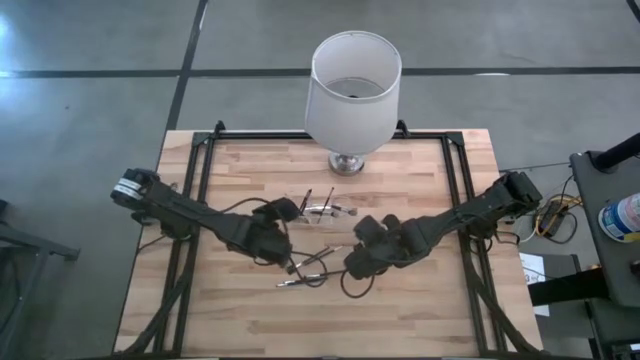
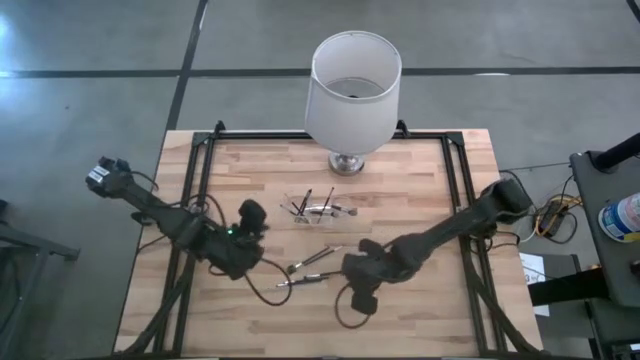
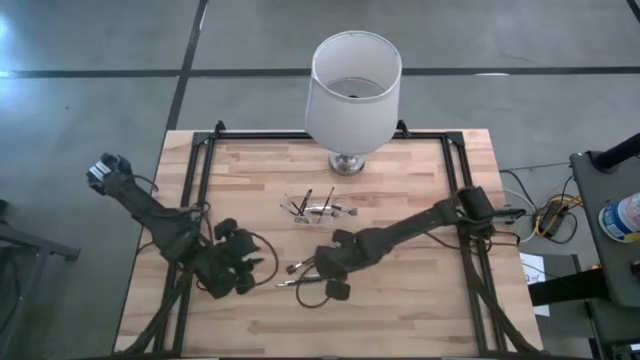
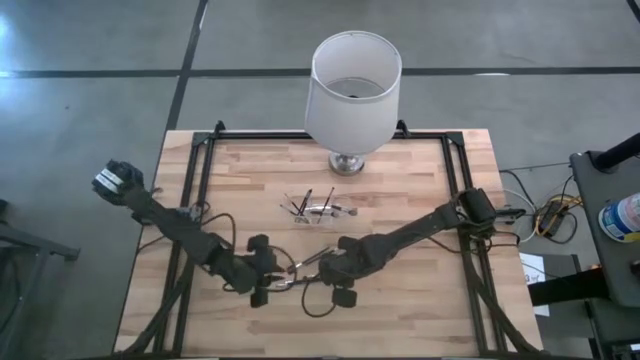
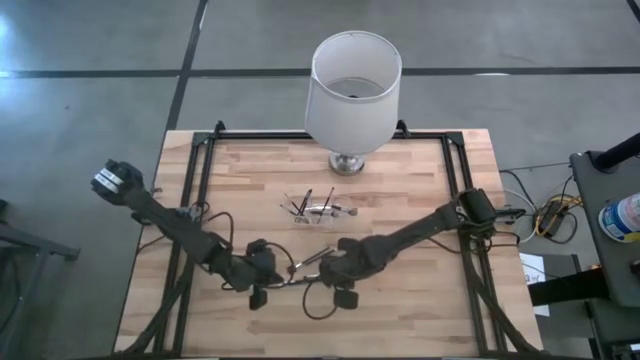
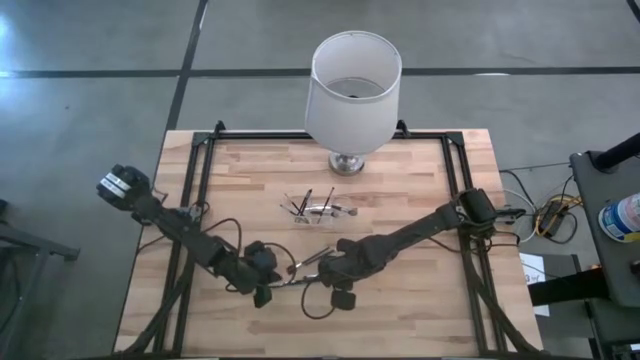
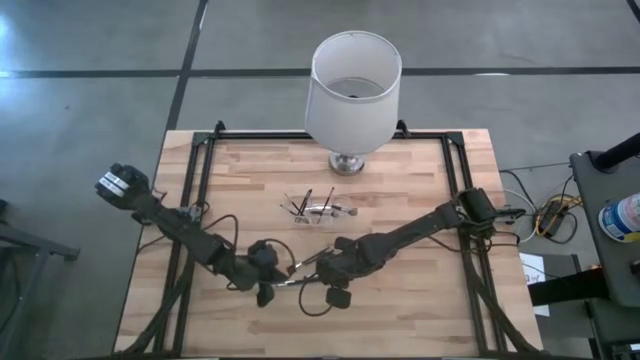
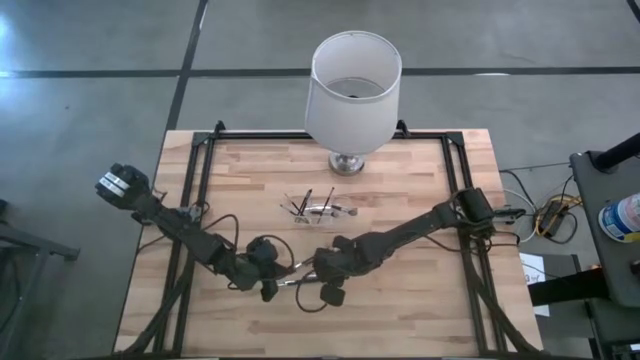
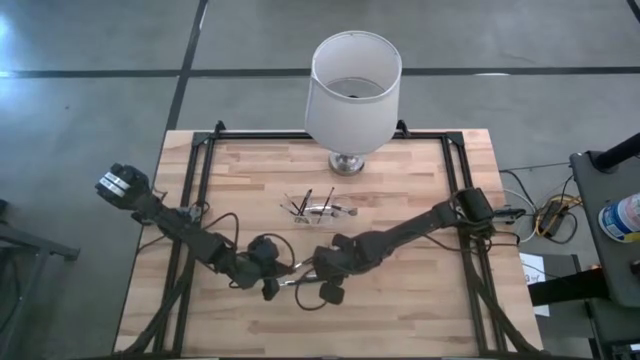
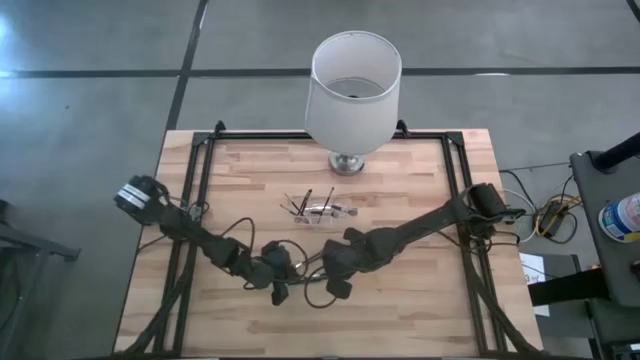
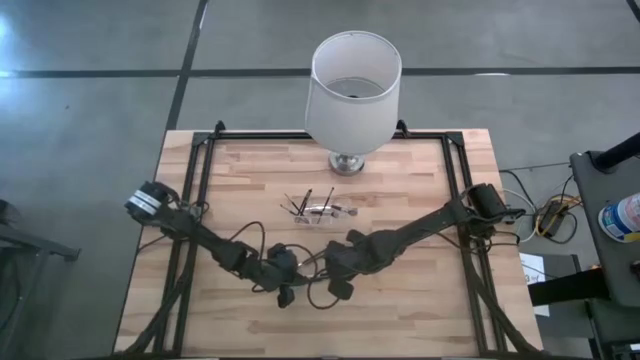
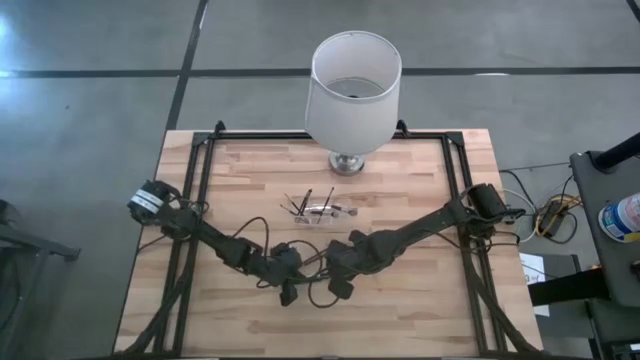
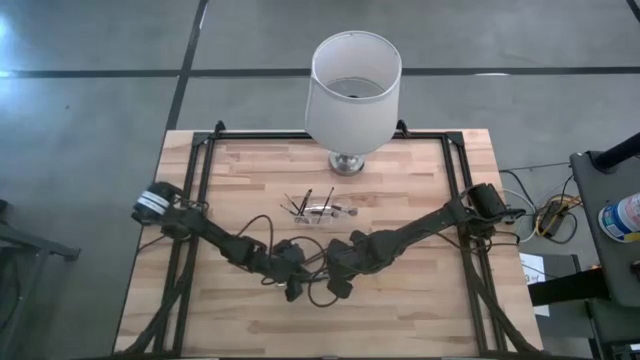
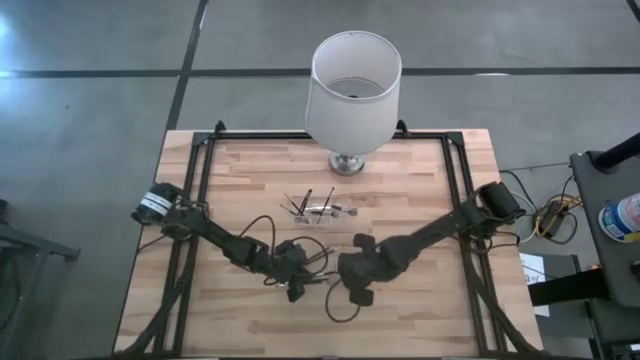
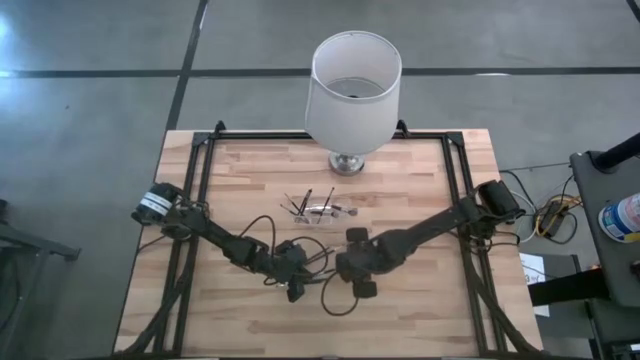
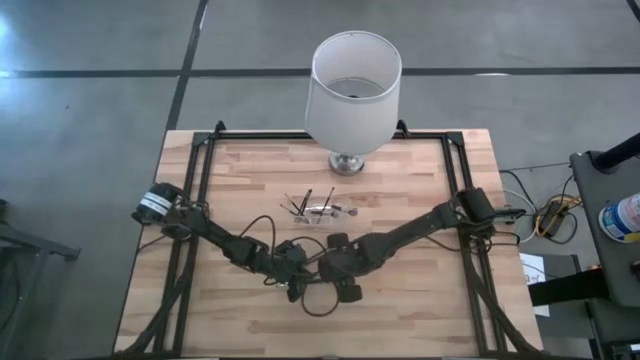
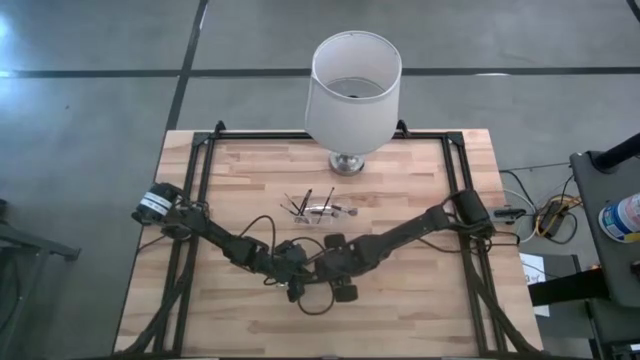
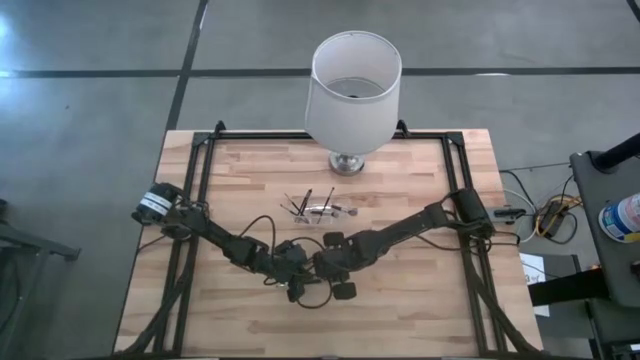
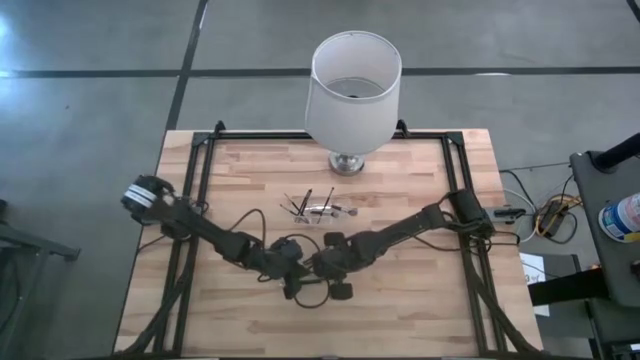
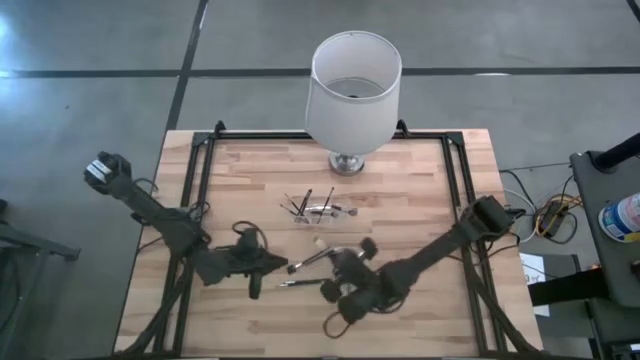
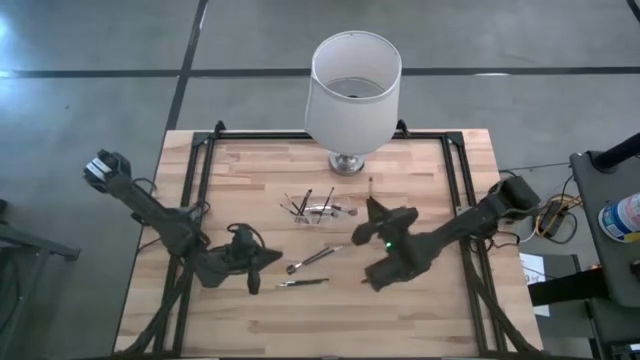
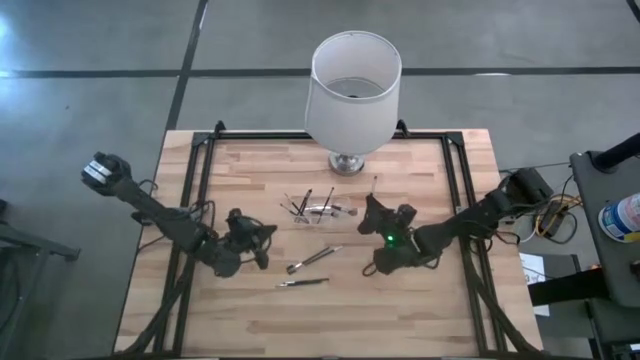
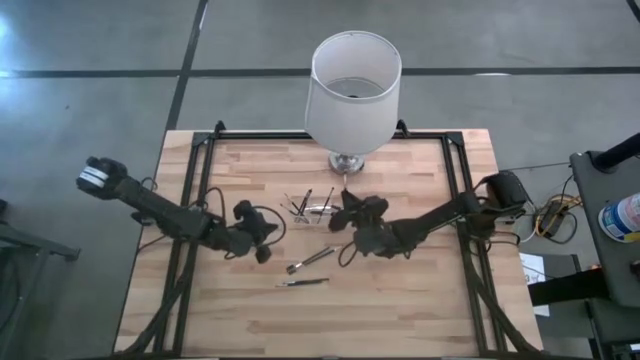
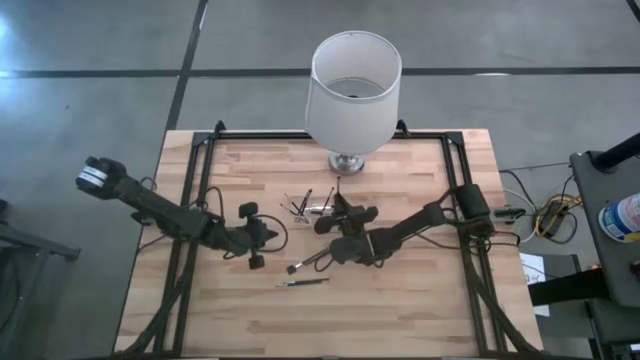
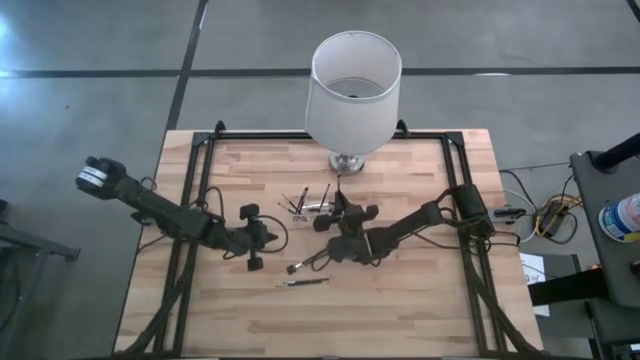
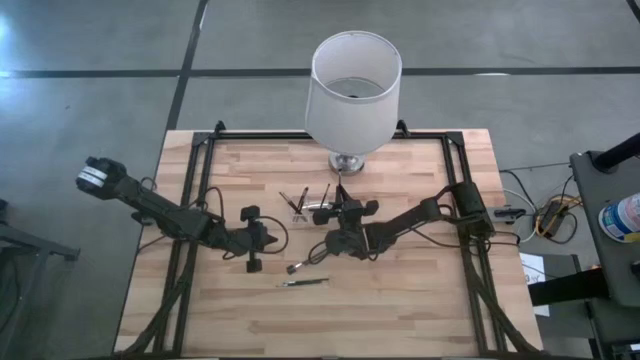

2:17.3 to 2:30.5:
Task: Put items in baskets/containers
Put the eyeshadow brush into the transparent organizer

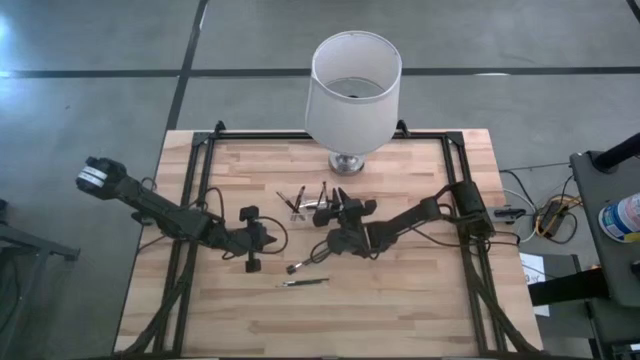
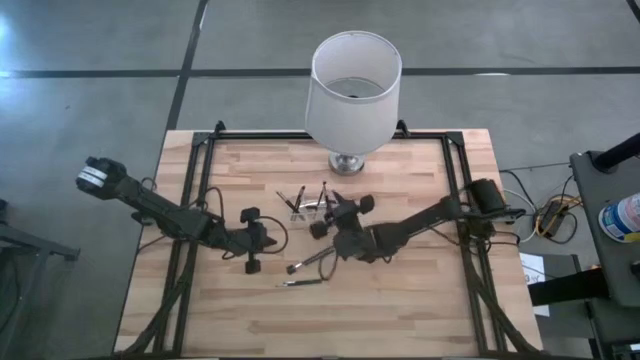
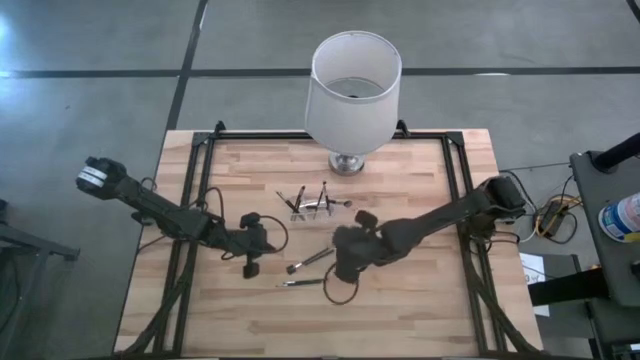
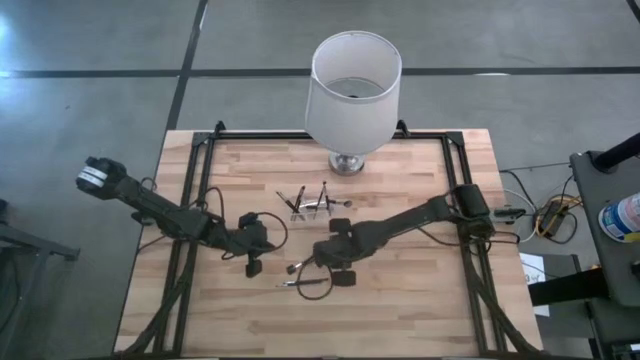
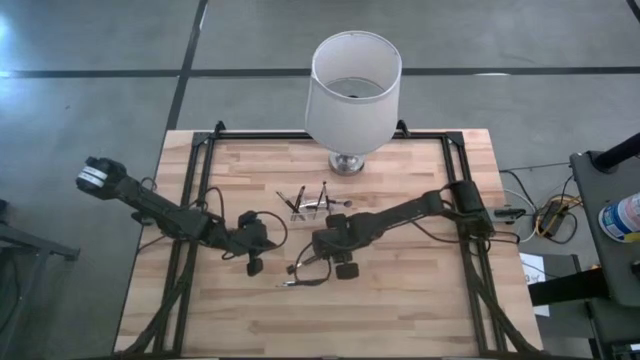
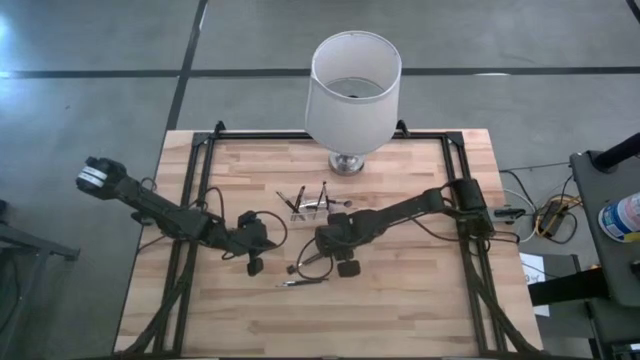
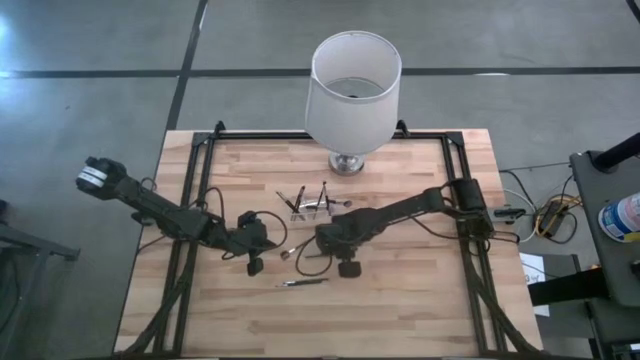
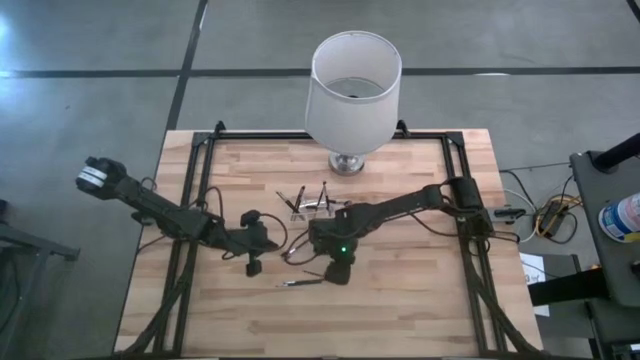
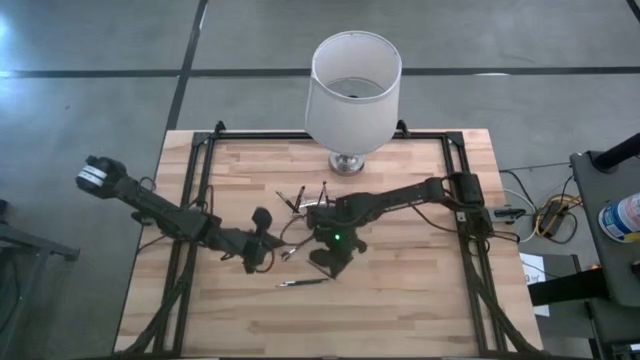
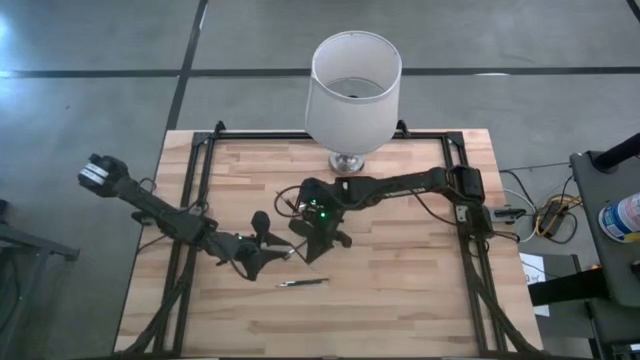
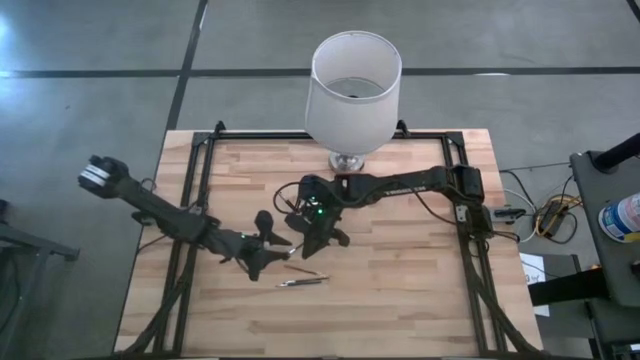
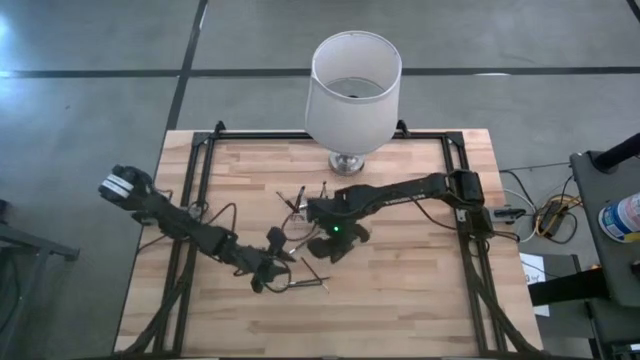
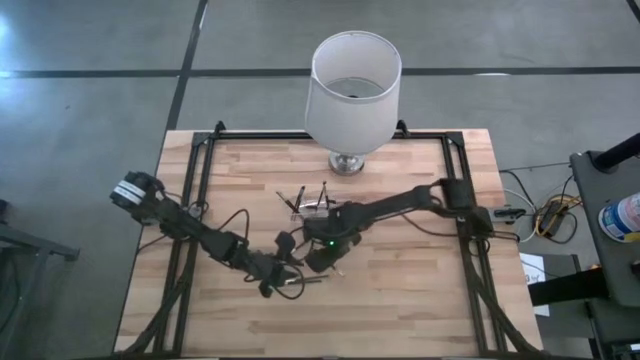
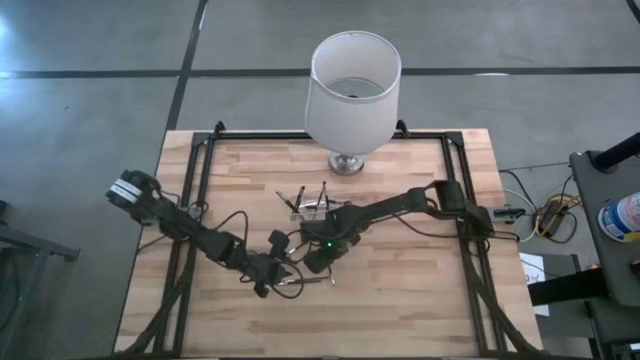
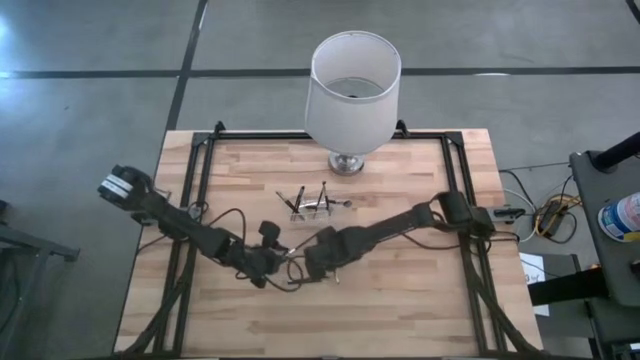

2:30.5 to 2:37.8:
Put the eyeshadow brush into the transparent organizer
